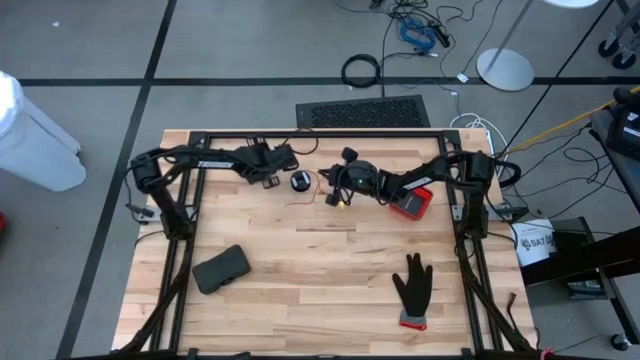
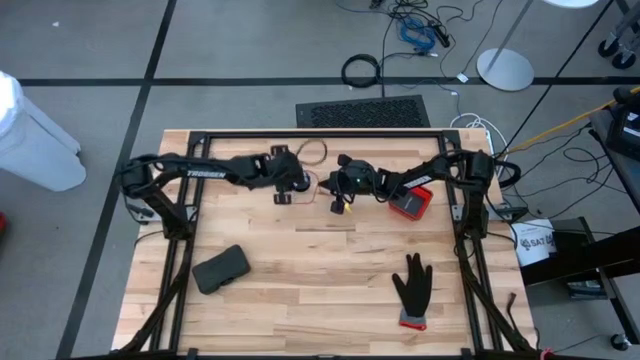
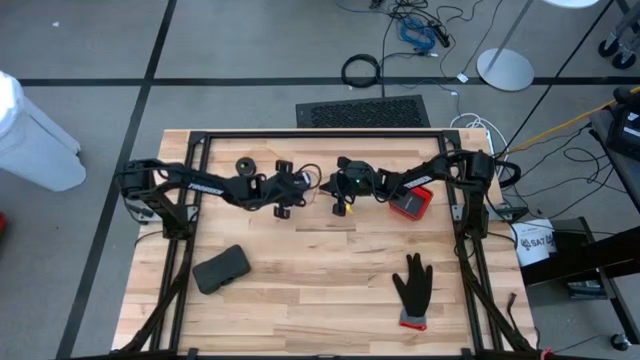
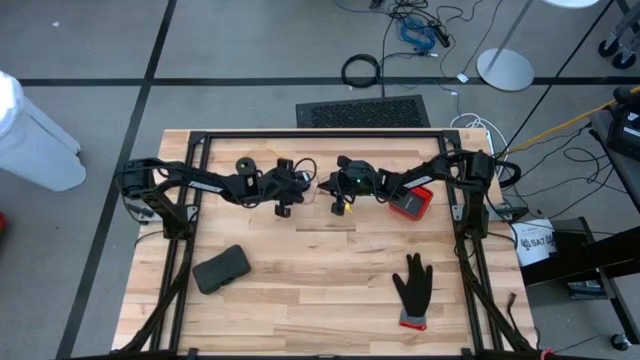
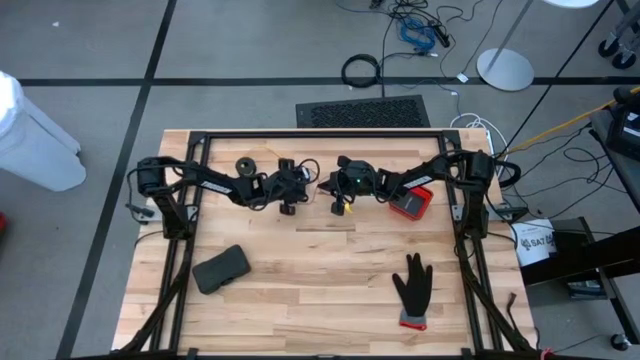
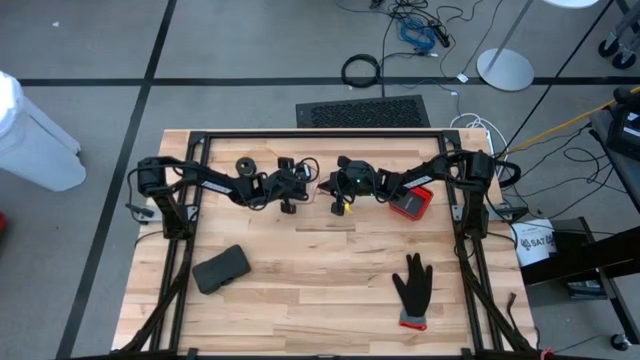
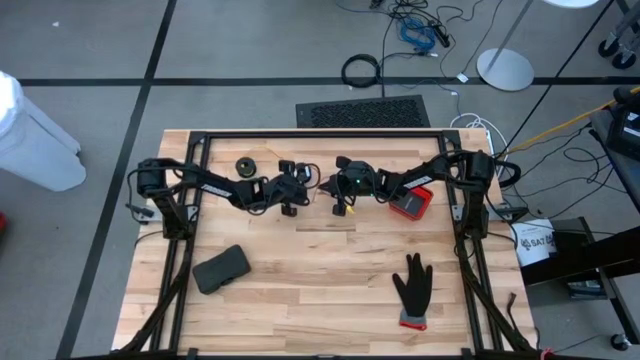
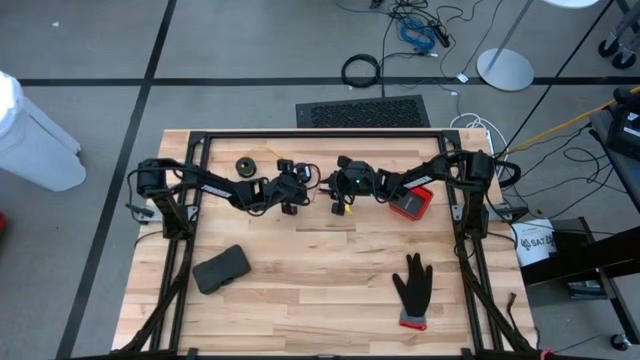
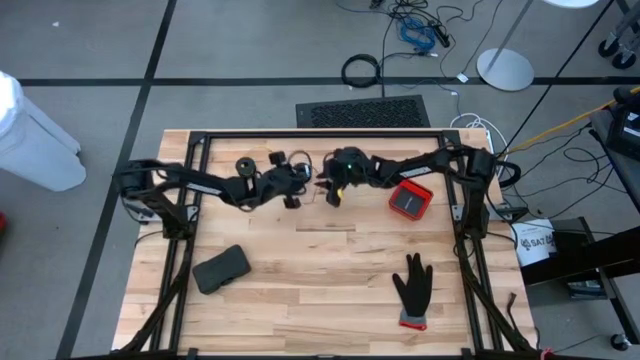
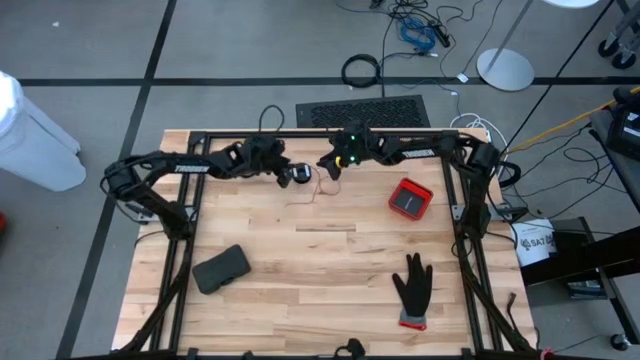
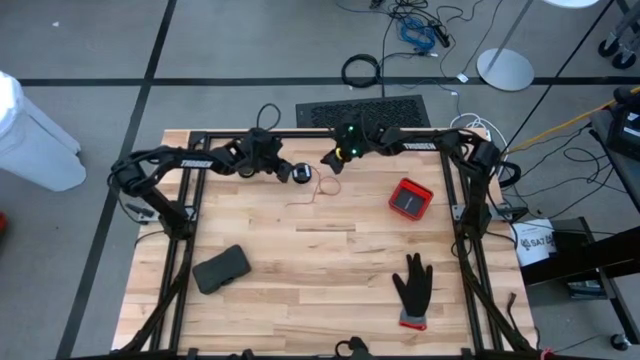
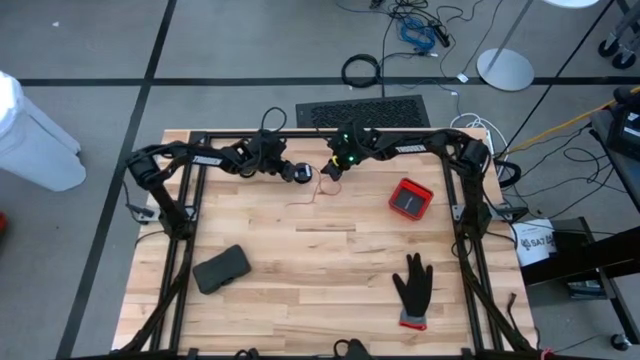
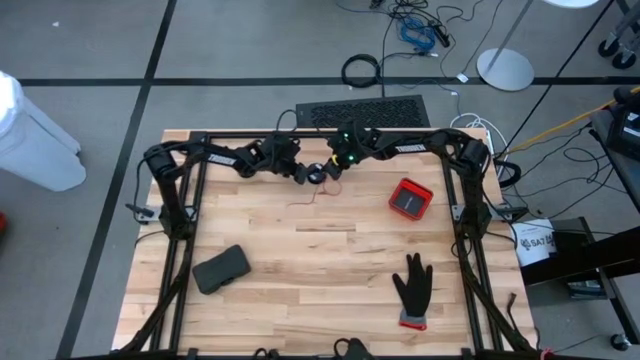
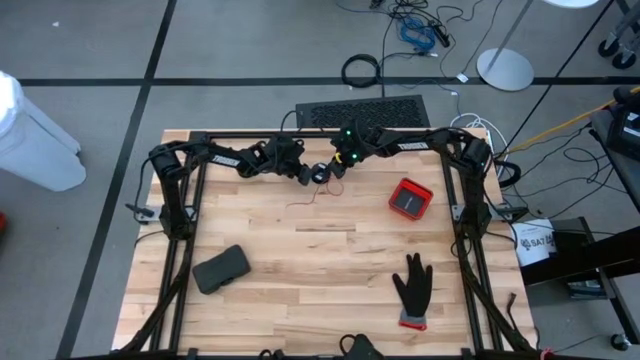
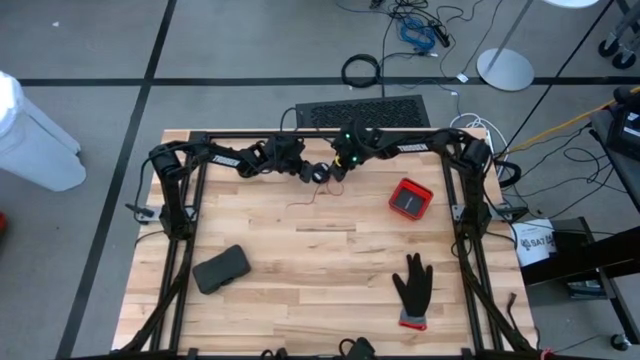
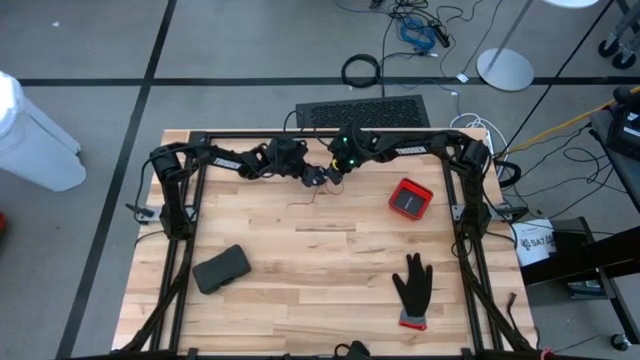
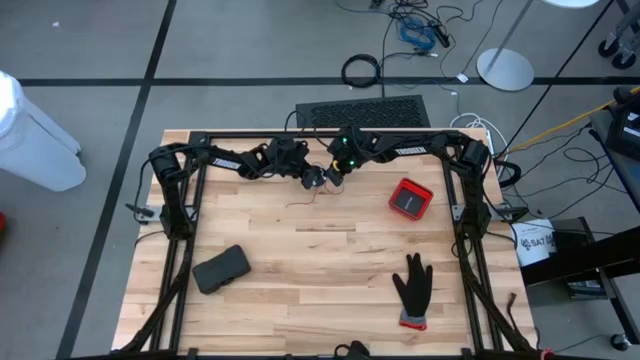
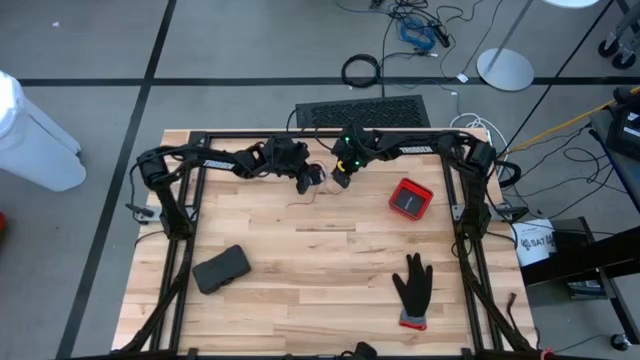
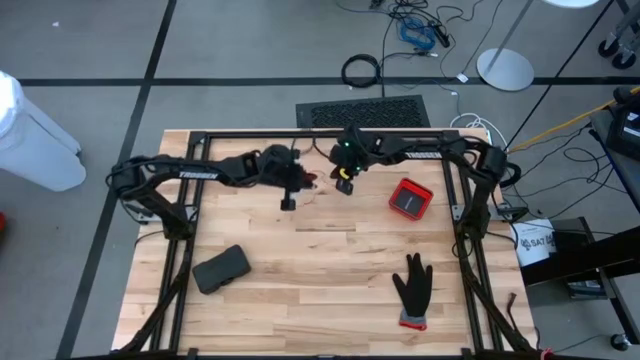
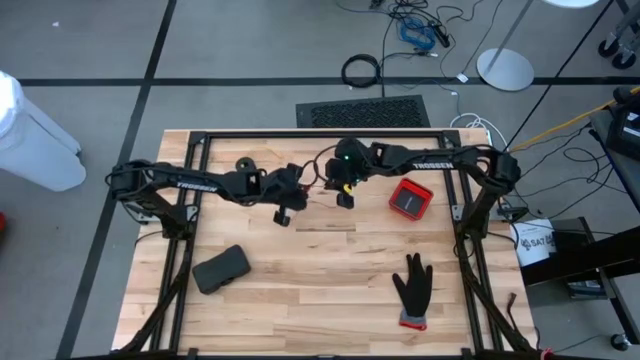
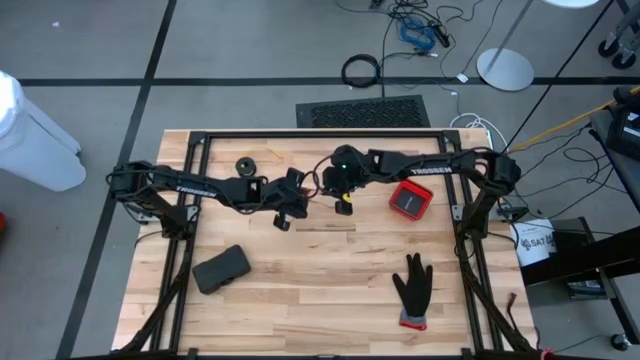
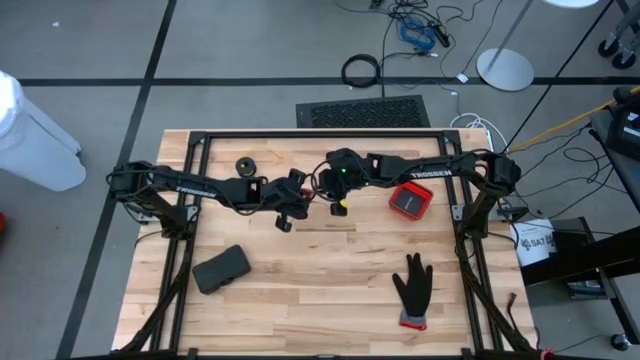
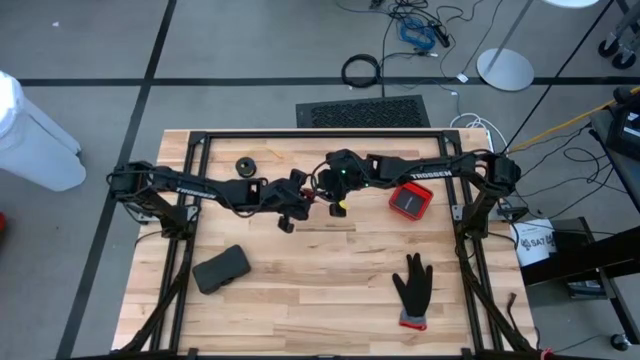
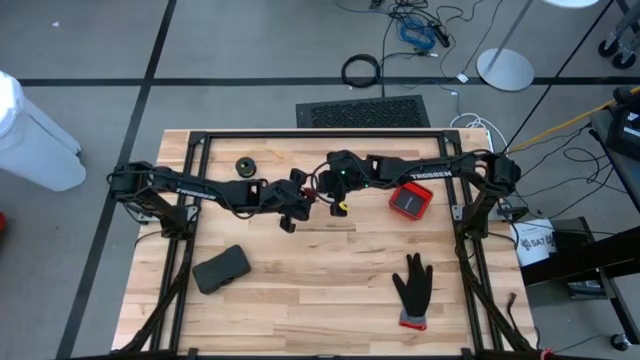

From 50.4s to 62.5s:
Task: Coil cords
Uncoil the red wire from the black spool

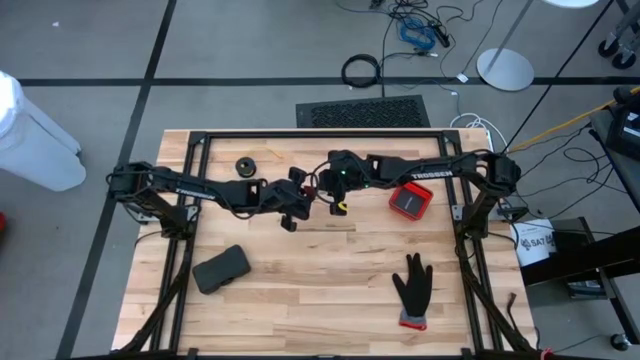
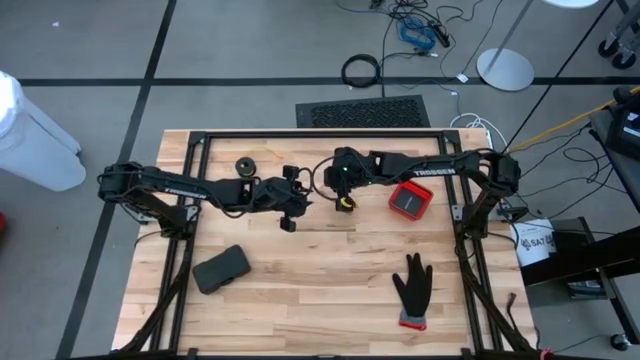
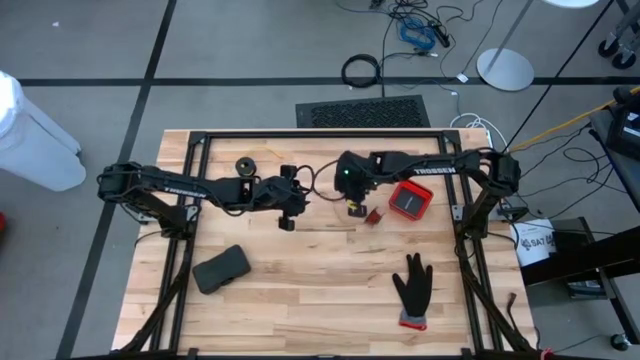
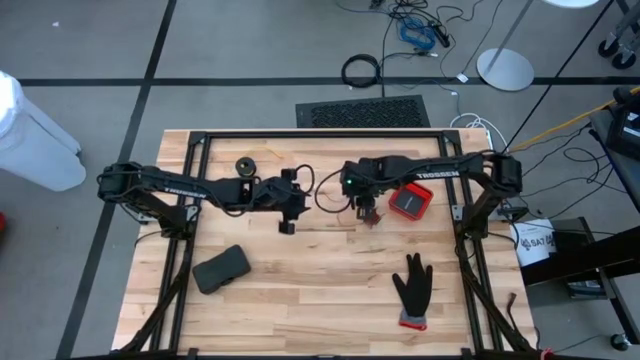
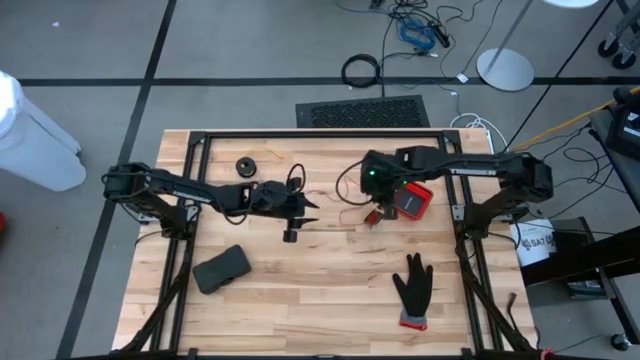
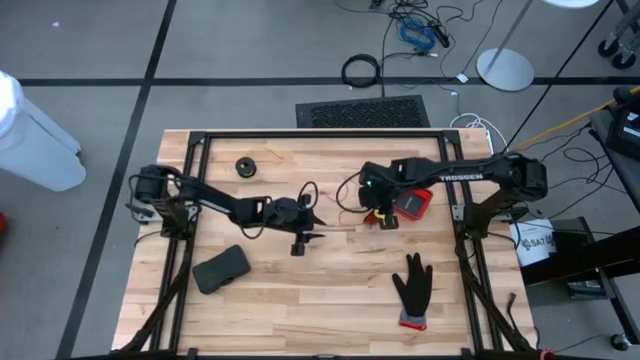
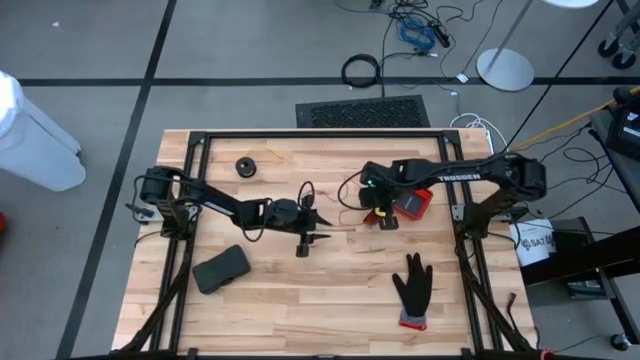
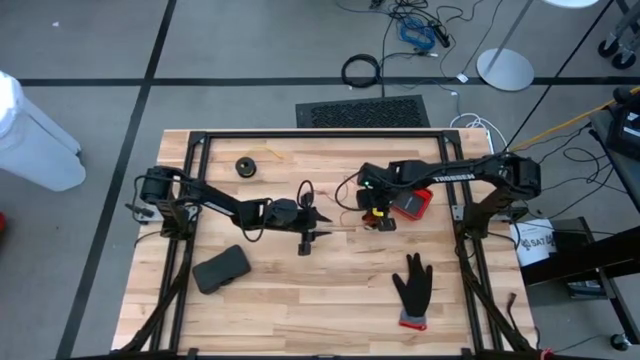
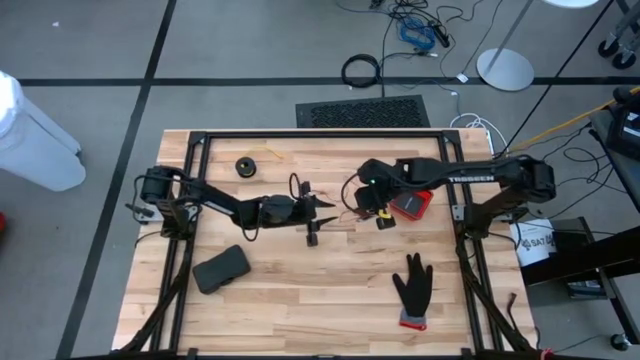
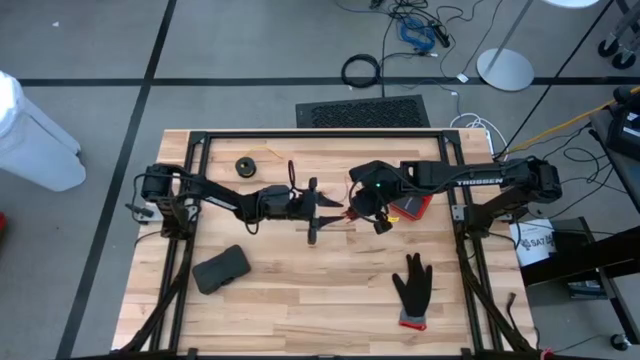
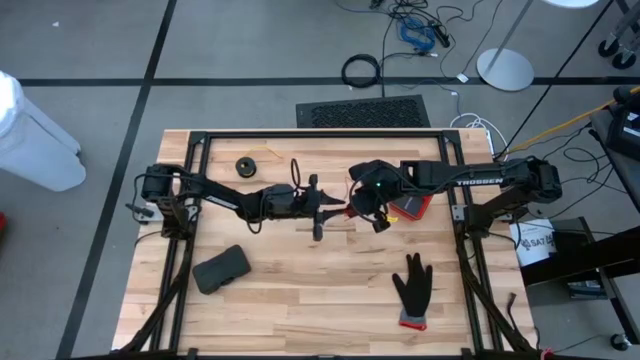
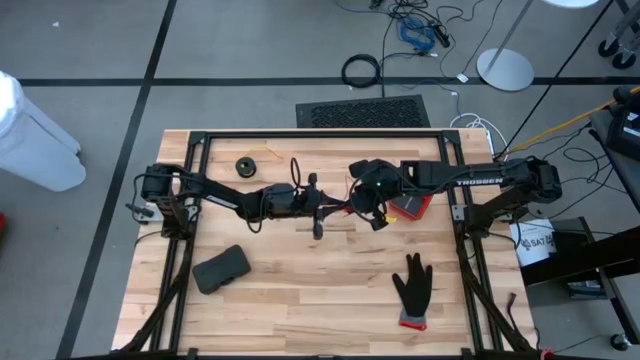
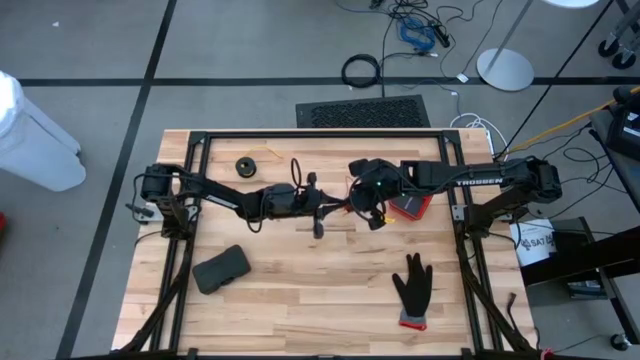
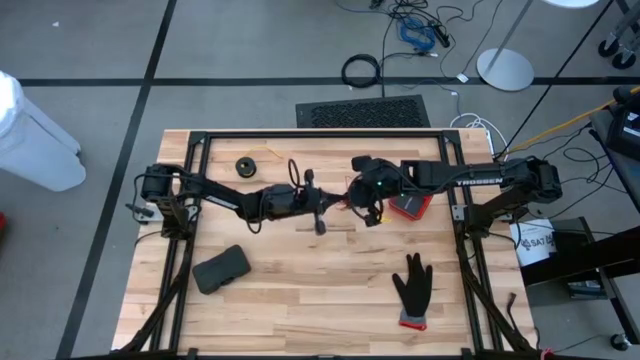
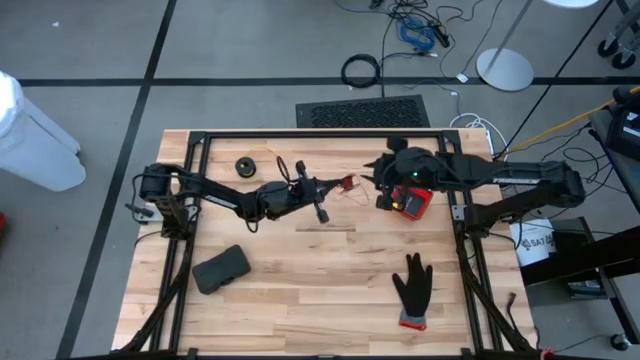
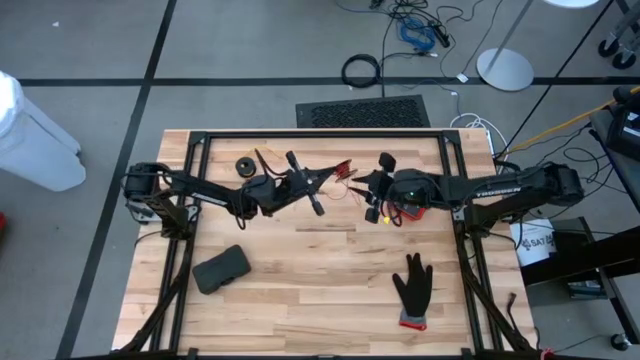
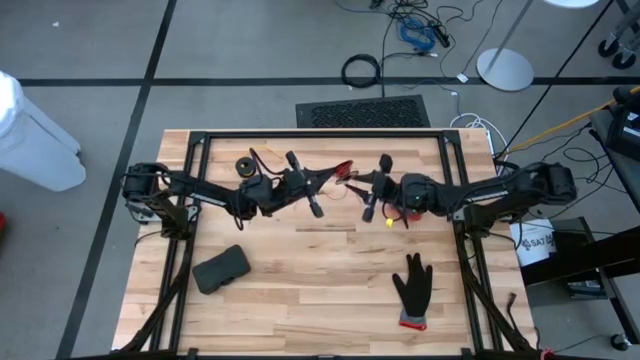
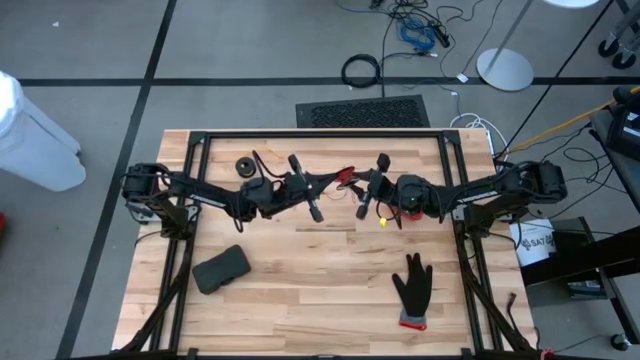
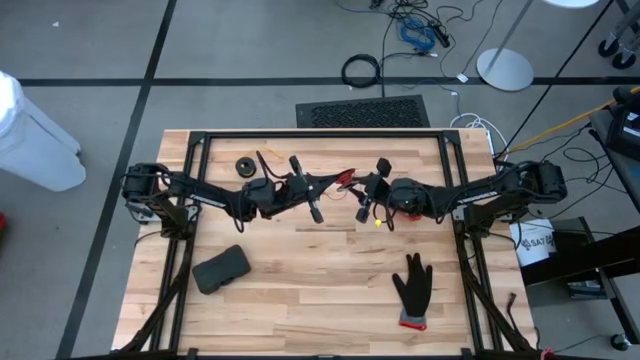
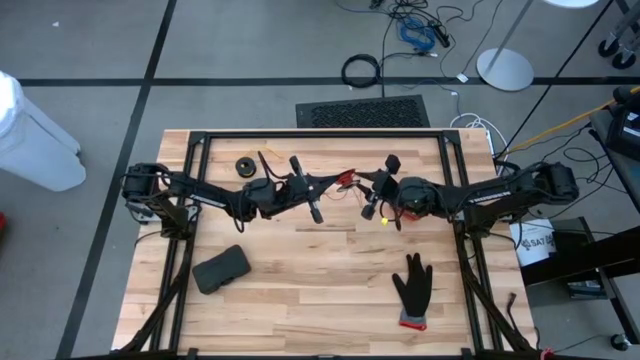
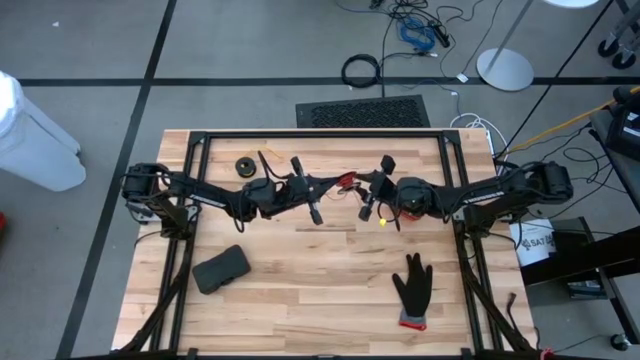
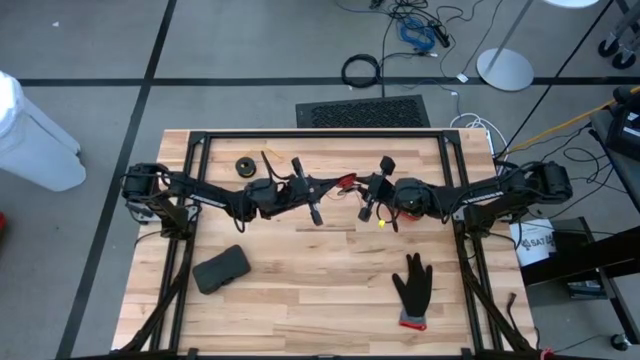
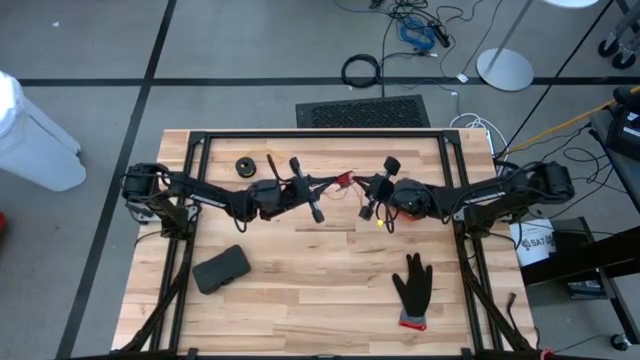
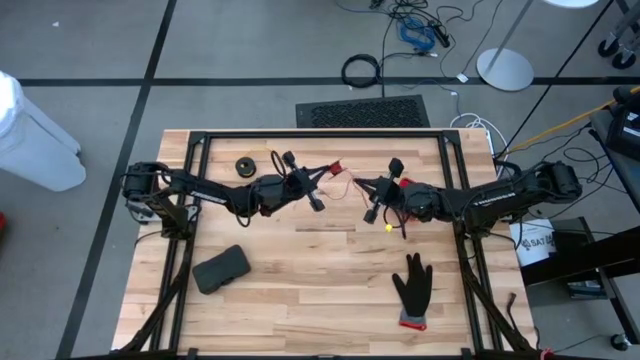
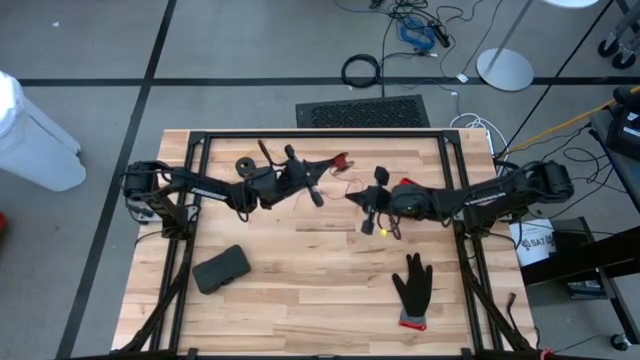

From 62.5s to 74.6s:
Uncoil the red wire from the black spool
